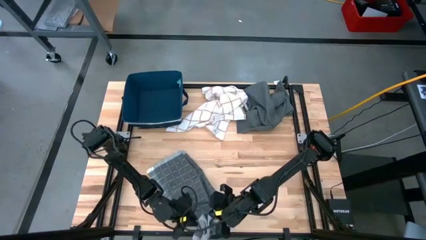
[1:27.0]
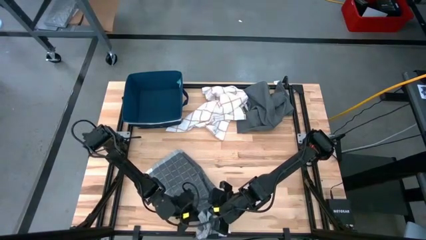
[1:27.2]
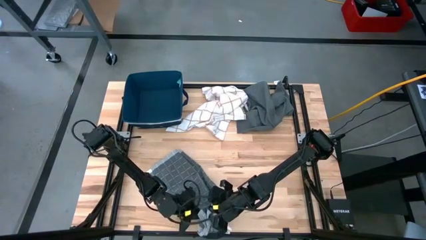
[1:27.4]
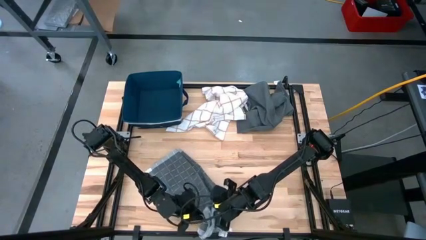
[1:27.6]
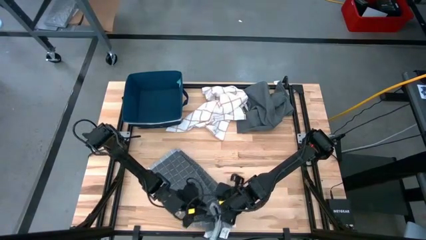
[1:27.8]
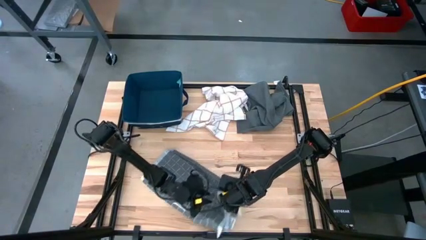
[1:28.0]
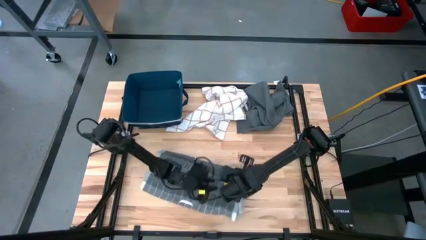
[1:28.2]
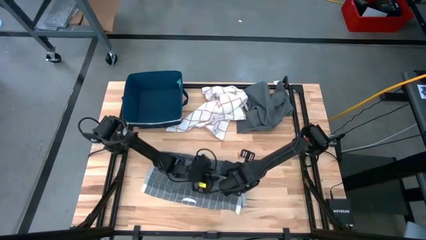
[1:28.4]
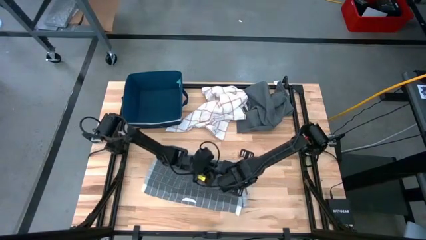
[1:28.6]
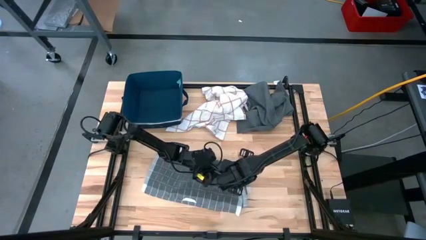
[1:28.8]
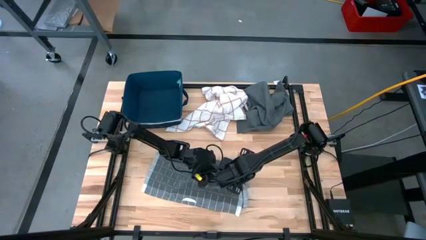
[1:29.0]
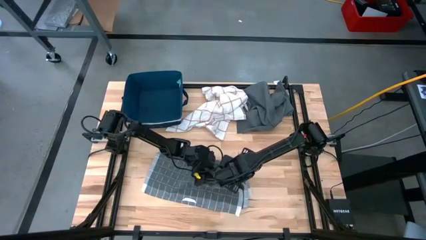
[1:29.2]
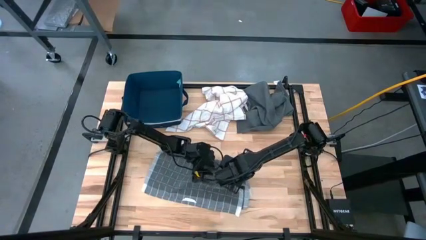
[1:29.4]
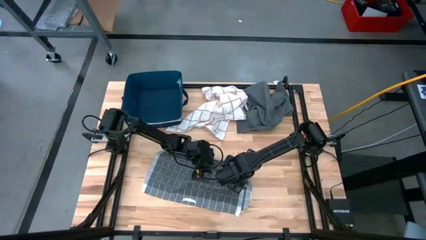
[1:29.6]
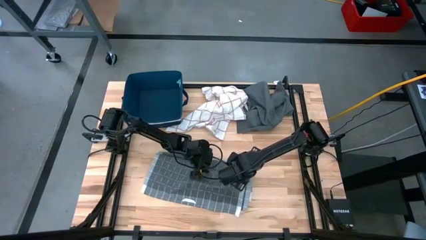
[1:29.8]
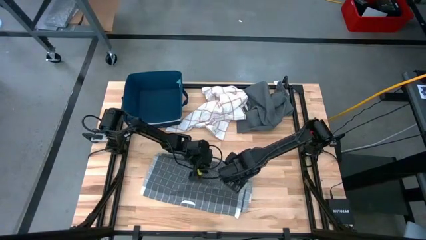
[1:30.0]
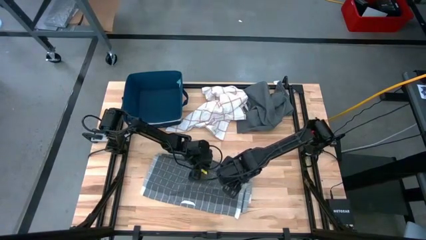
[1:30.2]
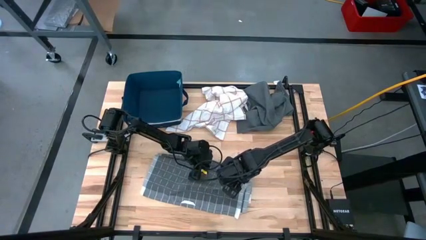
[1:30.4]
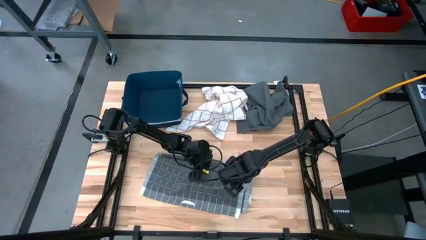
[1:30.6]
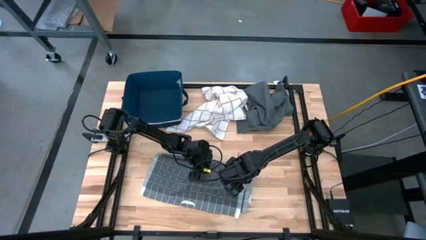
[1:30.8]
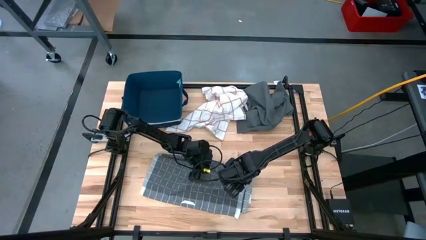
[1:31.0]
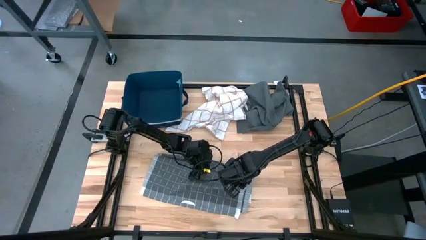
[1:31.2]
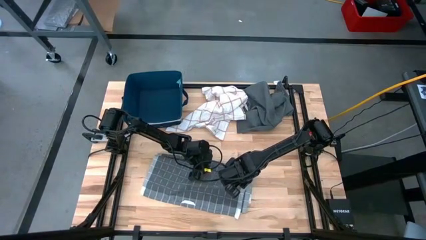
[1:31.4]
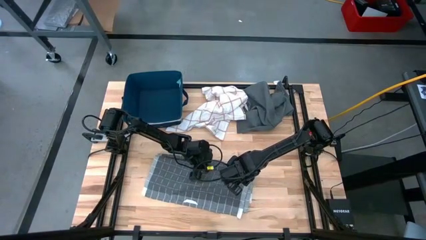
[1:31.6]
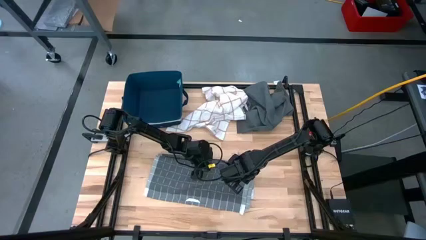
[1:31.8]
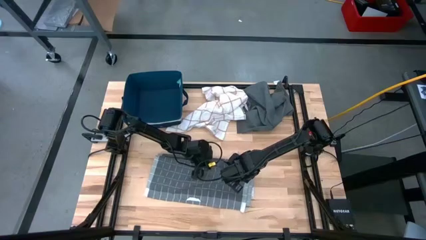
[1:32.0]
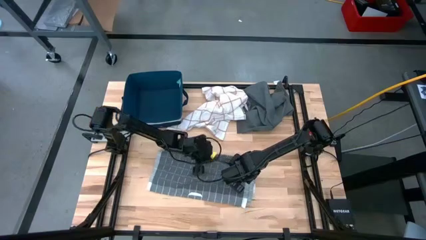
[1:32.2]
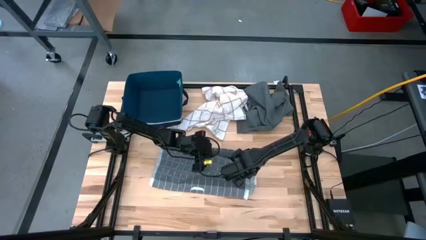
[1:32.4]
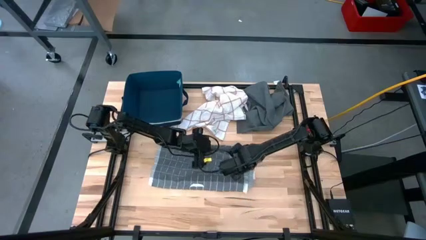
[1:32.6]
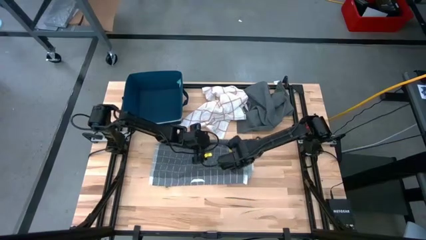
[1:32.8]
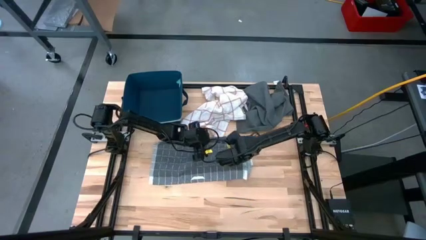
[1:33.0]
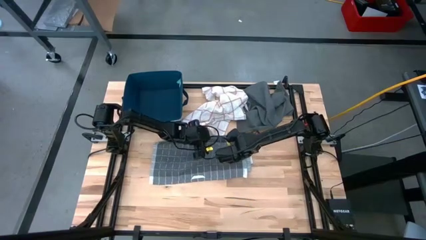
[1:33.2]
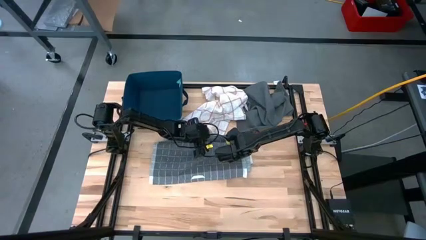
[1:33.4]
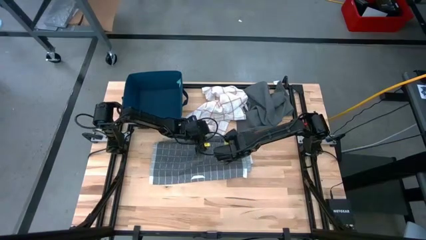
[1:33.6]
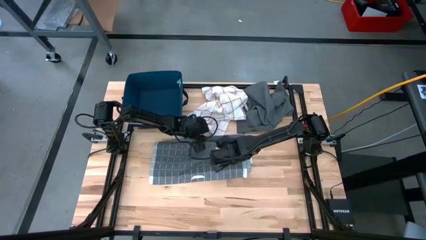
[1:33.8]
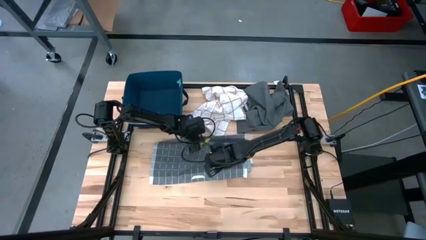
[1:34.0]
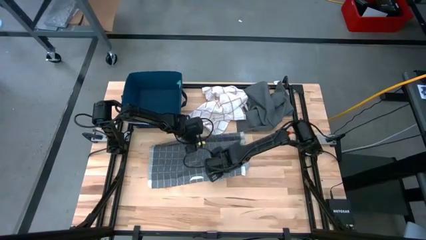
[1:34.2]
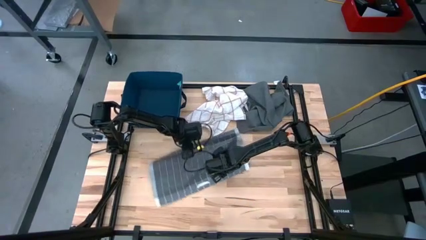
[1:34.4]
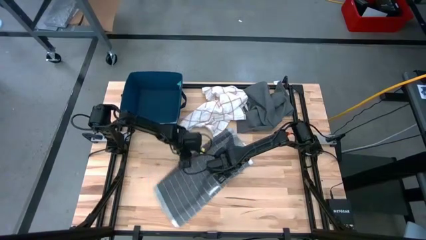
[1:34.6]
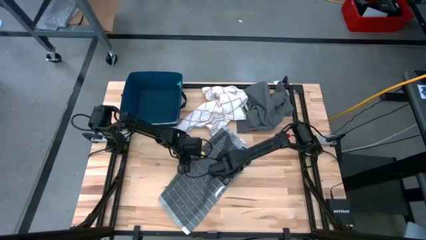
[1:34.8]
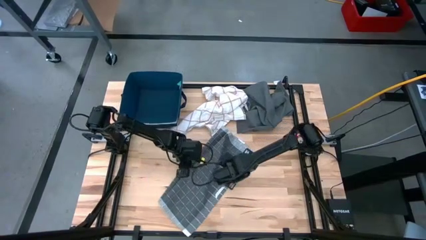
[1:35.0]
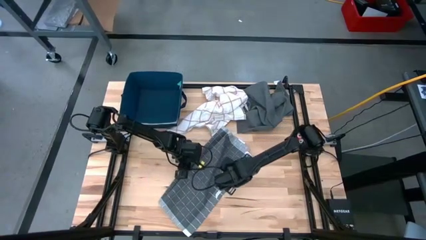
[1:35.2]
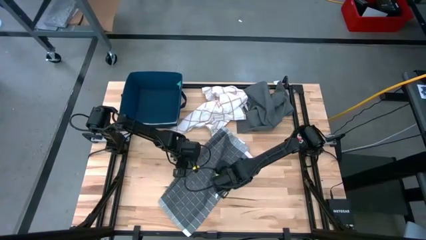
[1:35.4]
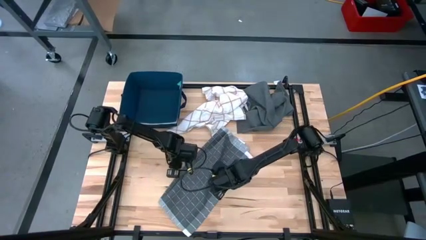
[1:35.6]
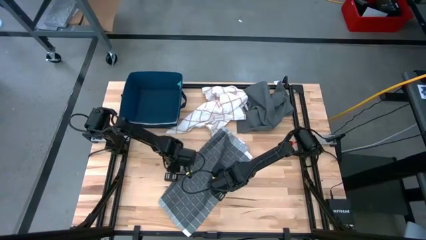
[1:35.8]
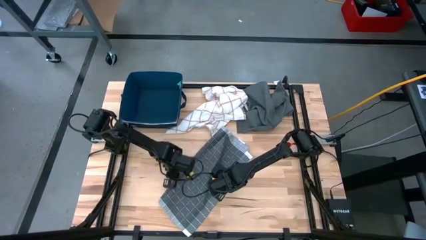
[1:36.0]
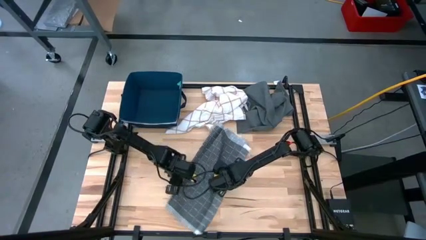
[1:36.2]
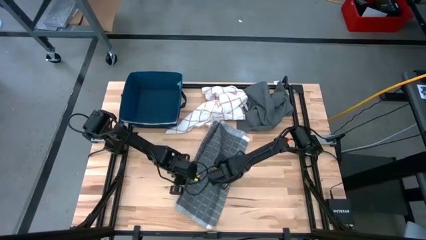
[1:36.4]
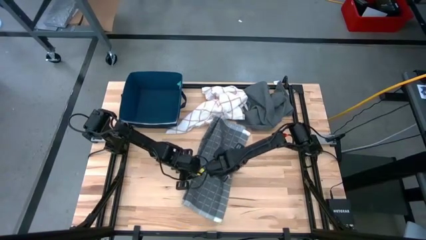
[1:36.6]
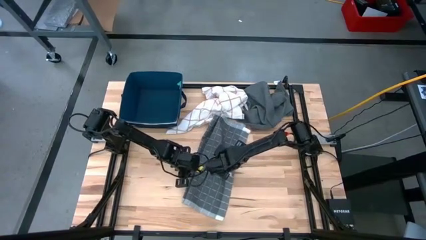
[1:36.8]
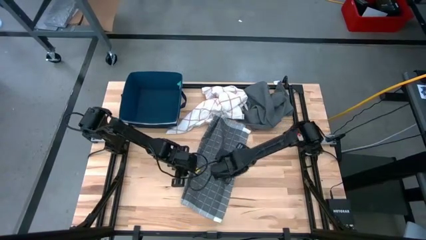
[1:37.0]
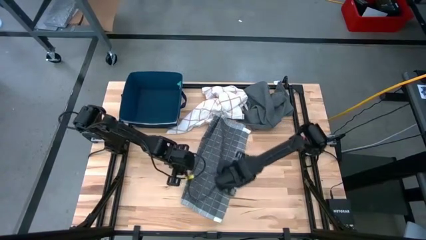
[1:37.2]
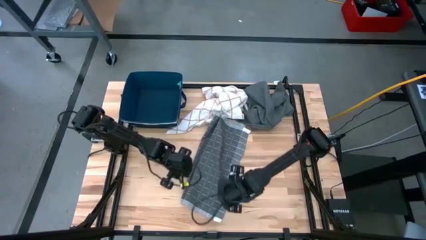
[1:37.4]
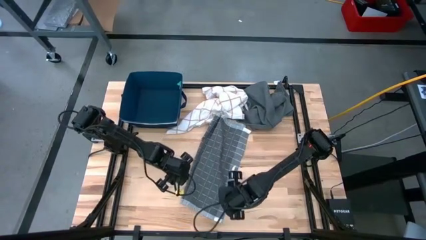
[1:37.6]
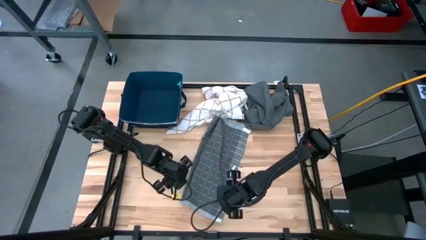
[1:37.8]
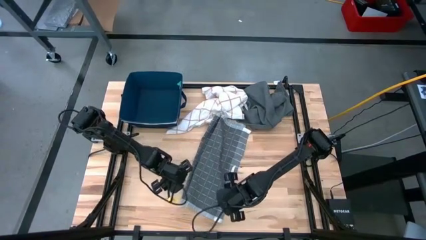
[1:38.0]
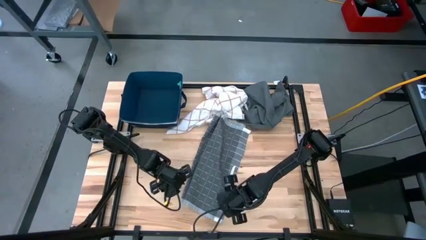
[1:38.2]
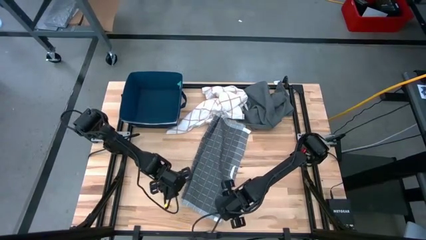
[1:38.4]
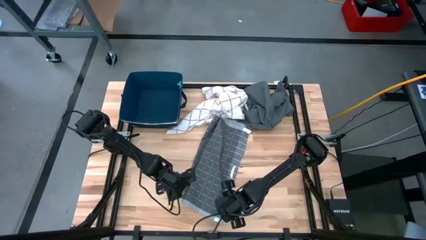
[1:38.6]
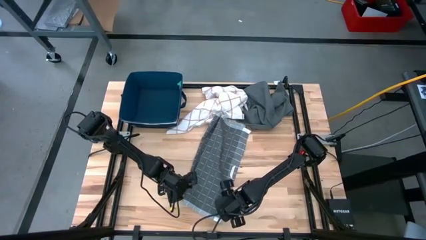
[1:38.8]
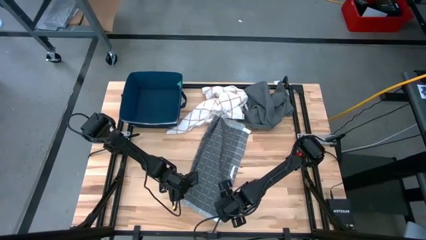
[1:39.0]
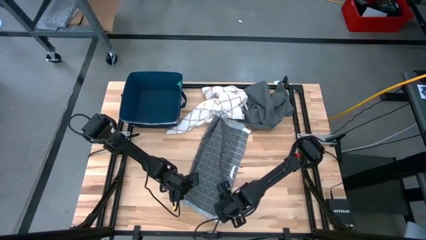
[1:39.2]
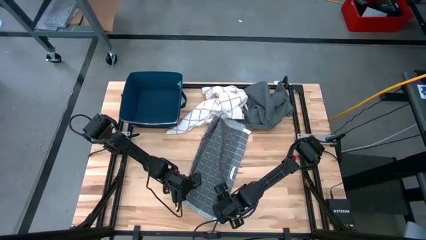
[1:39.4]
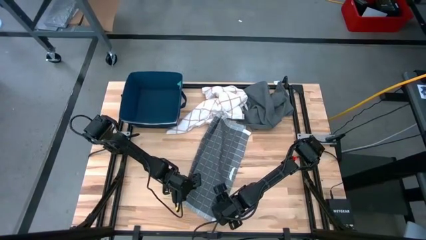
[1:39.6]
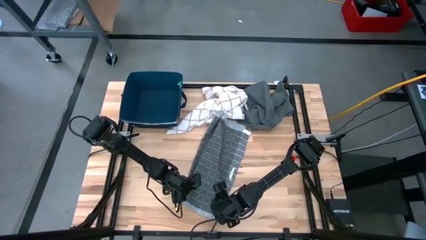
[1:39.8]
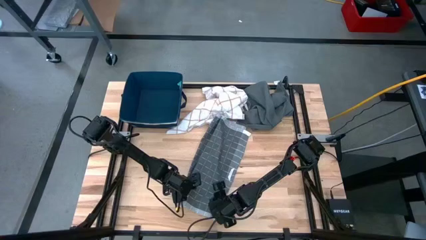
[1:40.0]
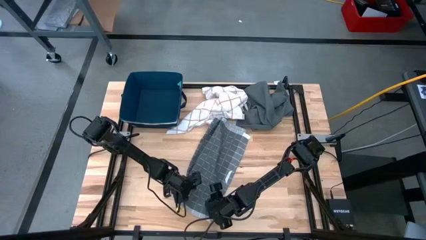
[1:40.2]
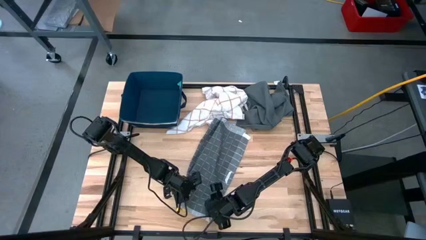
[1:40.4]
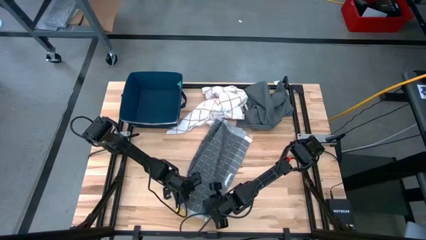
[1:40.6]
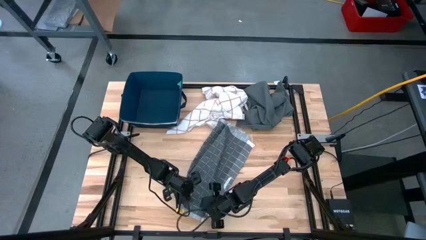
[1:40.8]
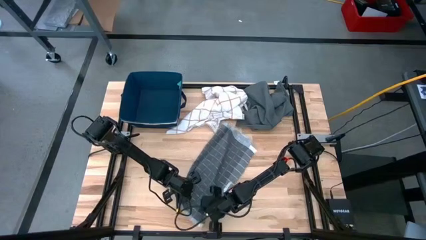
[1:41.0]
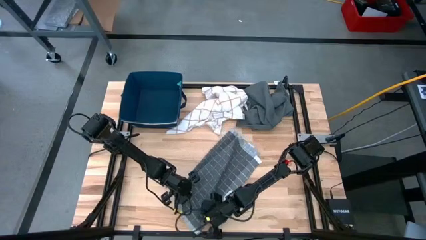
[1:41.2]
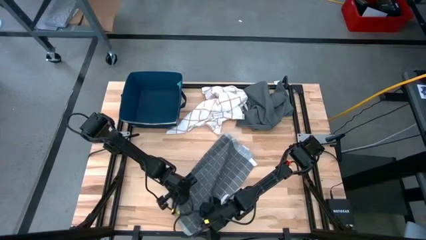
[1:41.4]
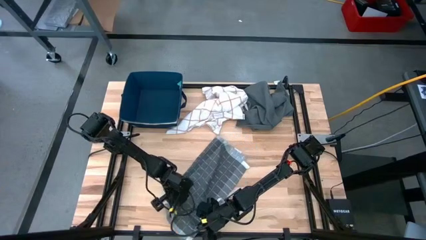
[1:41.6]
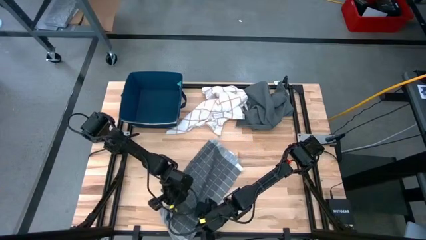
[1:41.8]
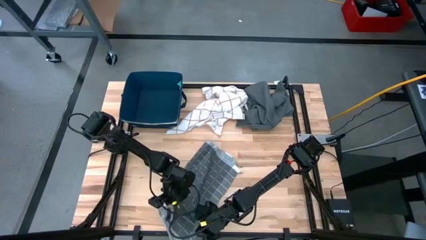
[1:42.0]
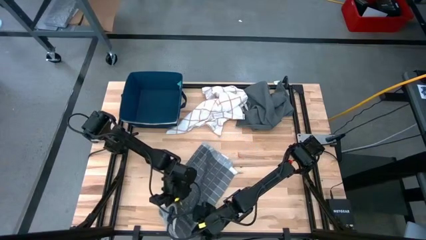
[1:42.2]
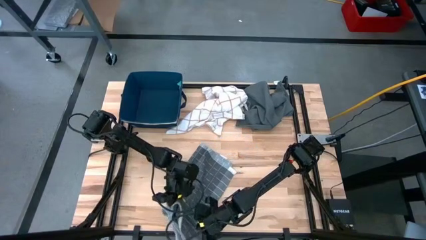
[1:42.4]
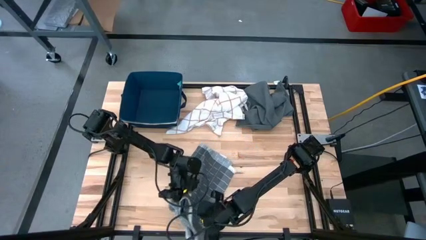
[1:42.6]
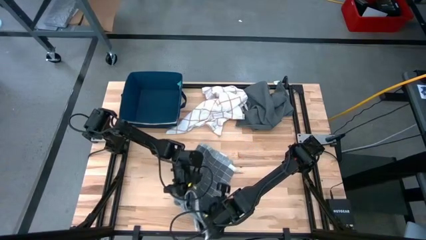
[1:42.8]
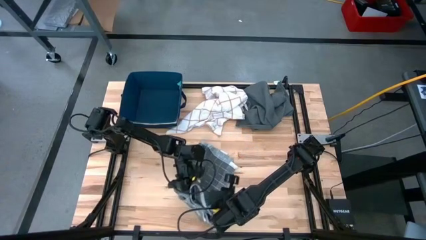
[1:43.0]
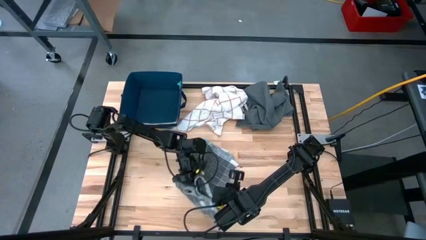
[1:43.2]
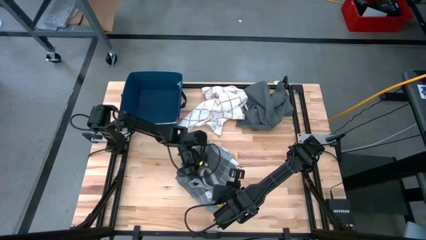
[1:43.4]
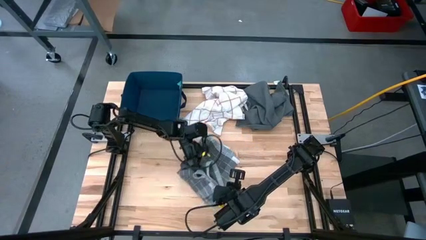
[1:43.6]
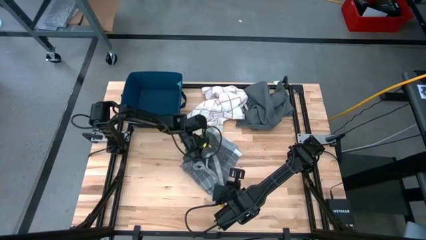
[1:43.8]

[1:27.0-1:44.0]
Task: Fold towel
Fold the gray patterned towel
